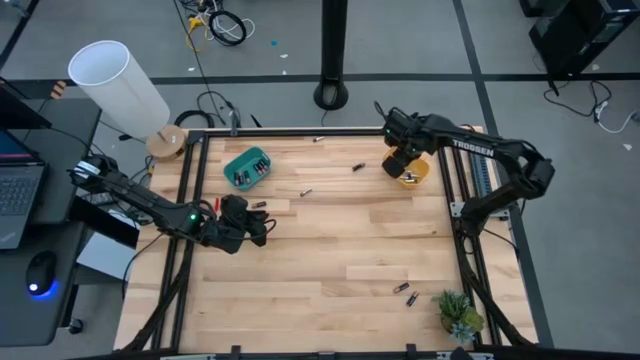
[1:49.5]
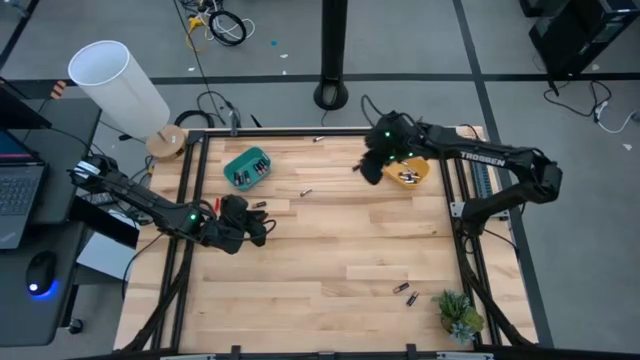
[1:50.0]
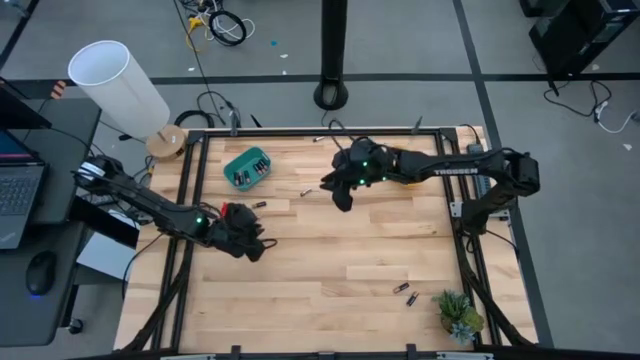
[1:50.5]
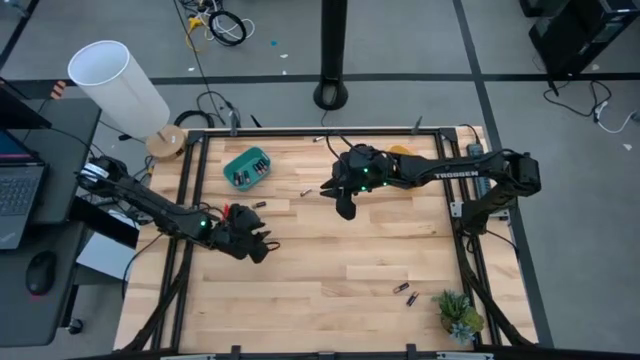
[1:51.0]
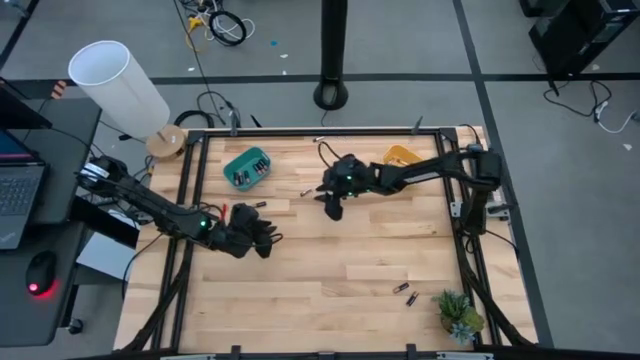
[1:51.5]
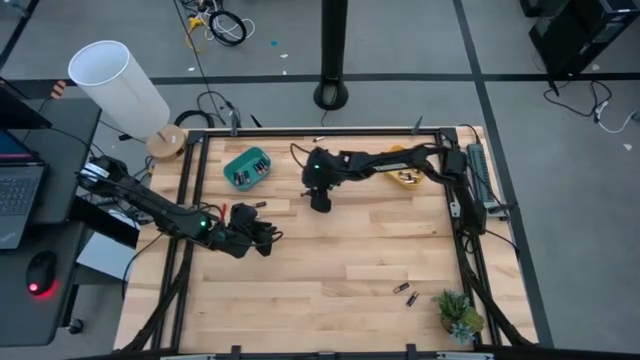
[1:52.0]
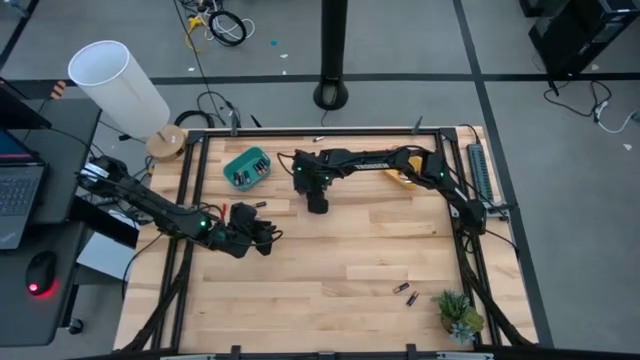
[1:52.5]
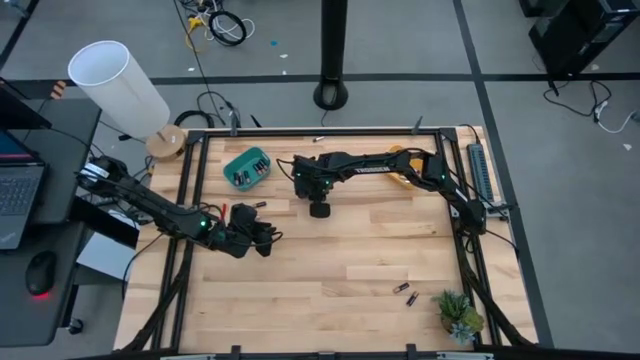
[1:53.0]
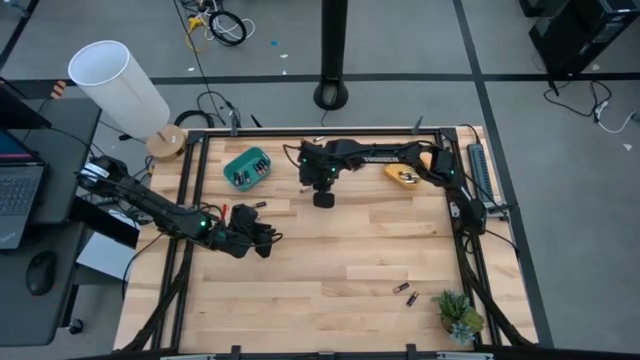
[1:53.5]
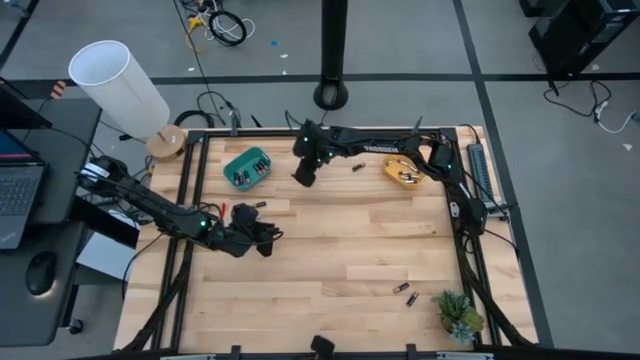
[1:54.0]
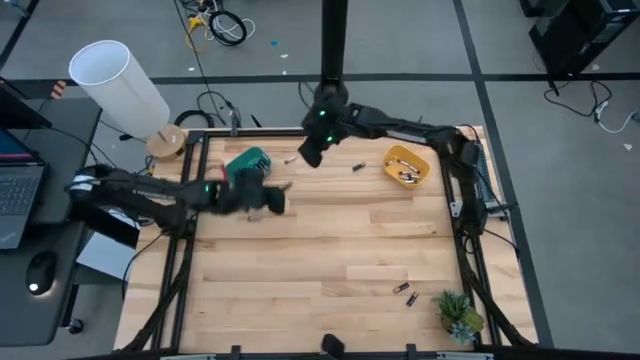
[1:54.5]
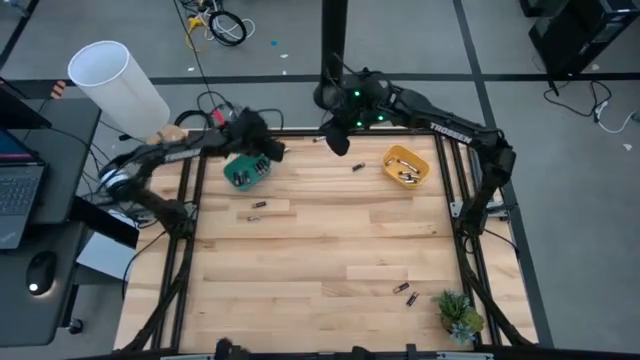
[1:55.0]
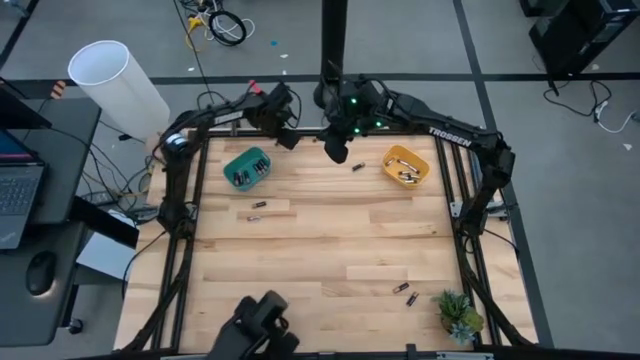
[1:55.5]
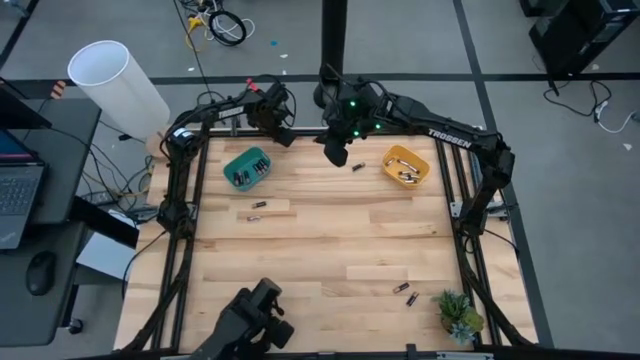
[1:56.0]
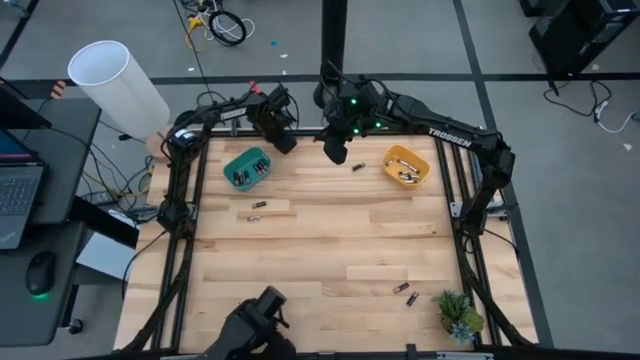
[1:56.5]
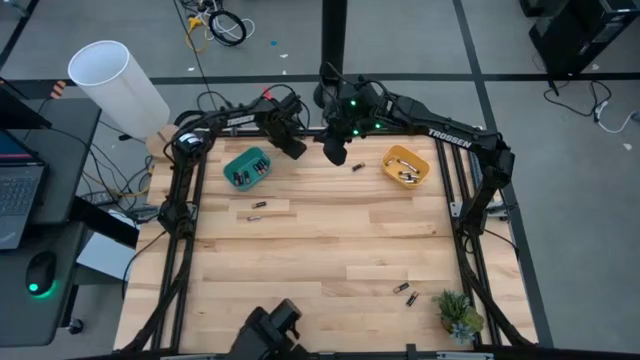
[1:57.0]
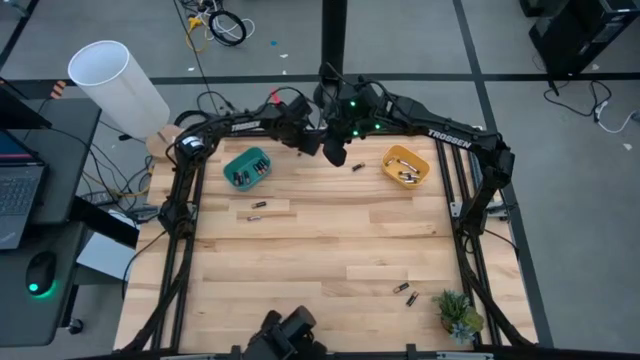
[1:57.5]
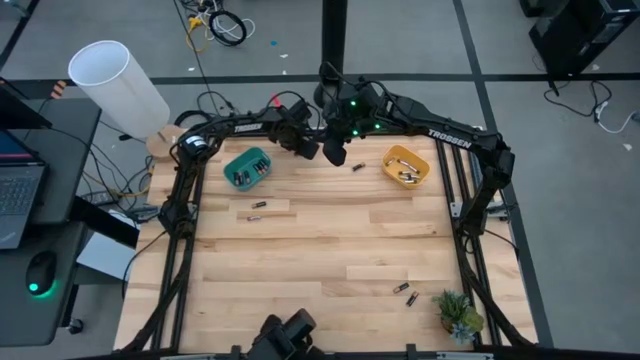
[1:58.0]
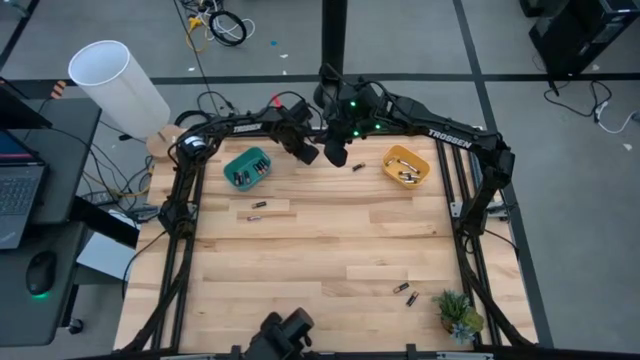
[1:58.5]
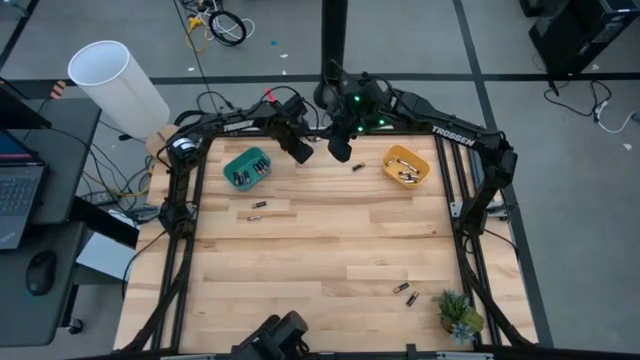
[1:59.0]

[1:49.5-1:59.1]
Task: Sort batteries
Put the silver battery into the yellow bin

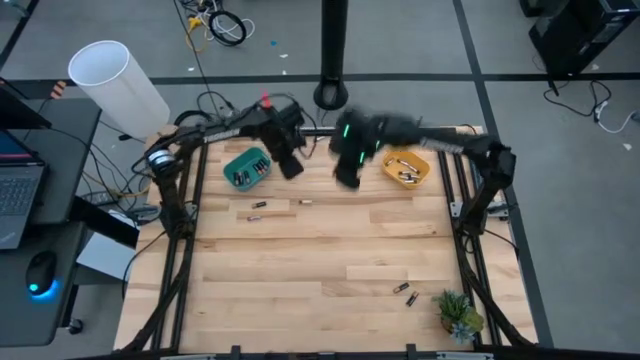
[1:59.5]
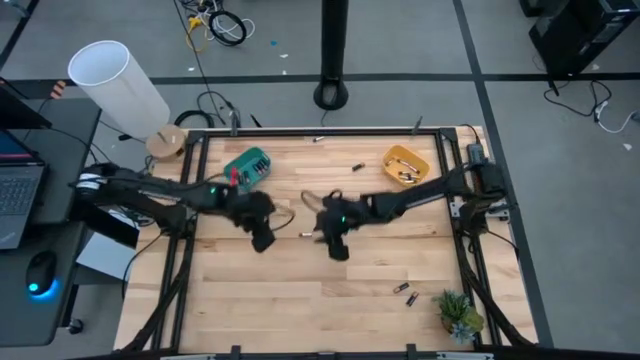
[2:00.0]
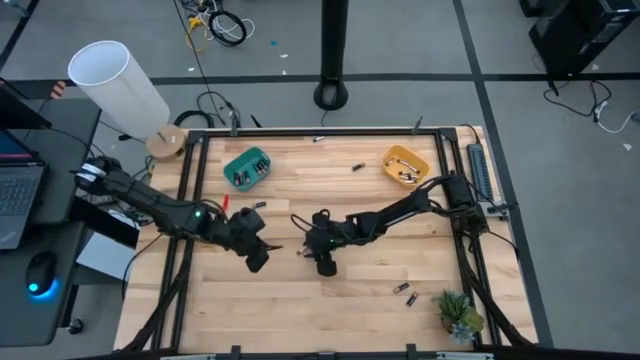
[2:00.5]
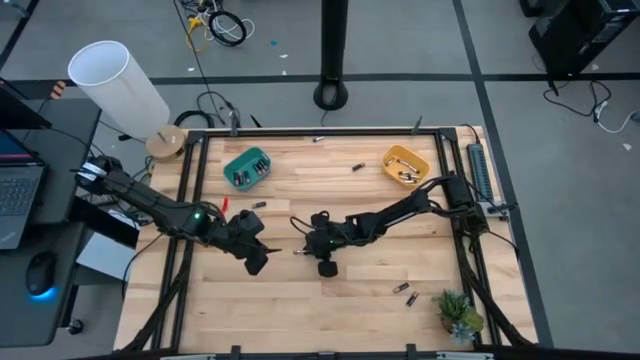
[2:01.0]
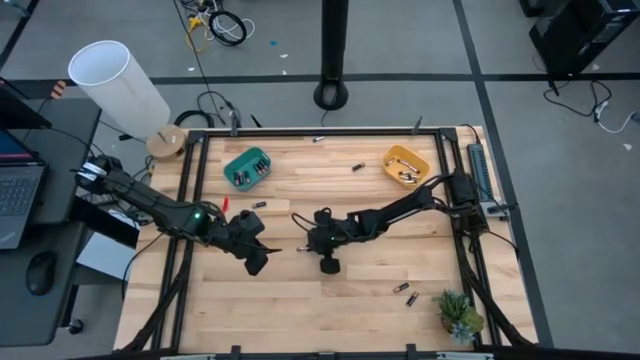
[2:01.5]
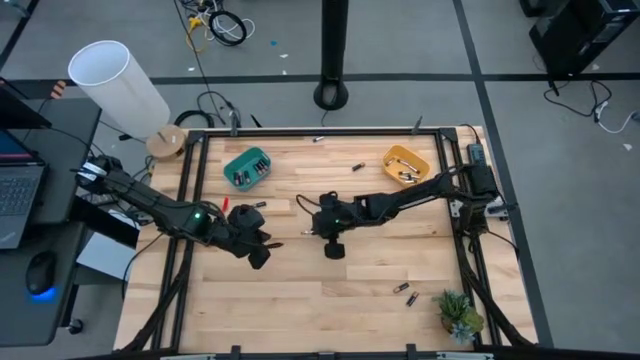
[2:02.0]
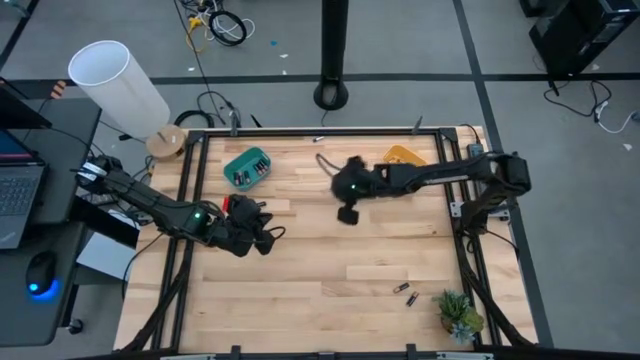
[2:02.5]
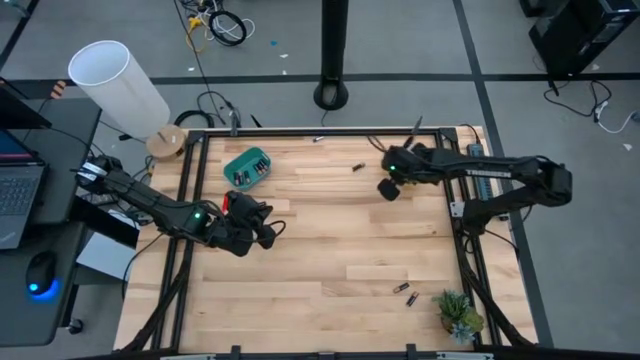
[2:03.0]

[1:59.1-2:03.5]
Put the silver battery into the yellow bin

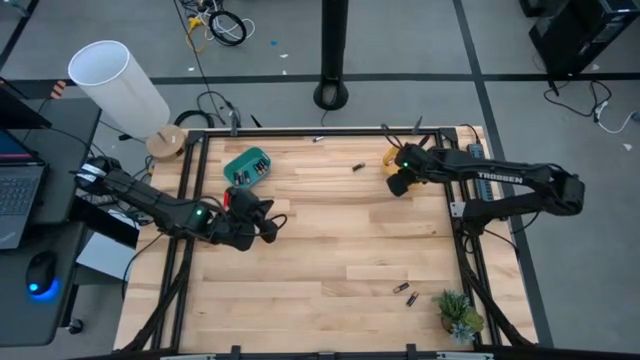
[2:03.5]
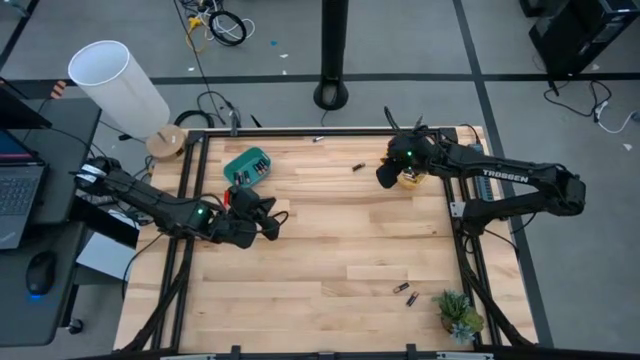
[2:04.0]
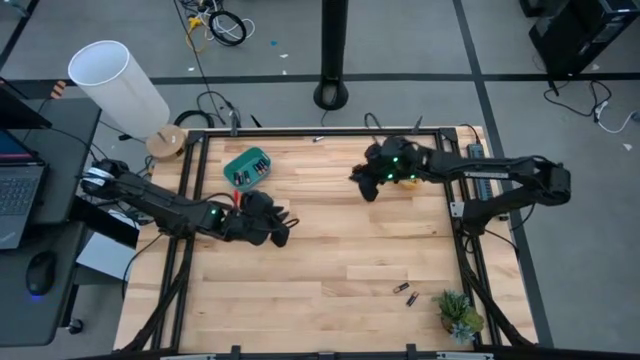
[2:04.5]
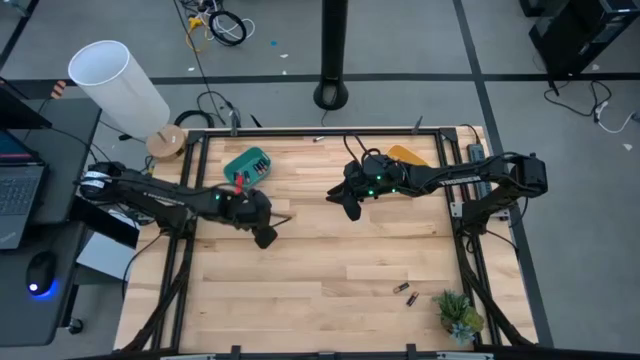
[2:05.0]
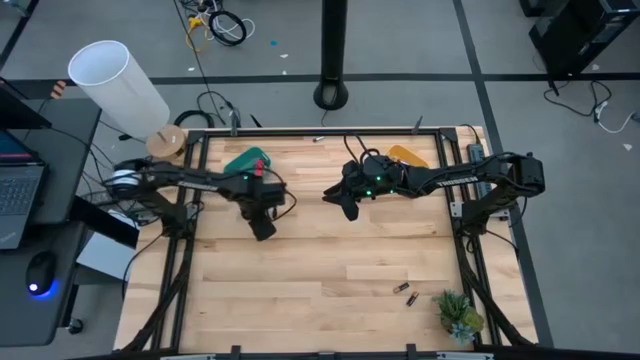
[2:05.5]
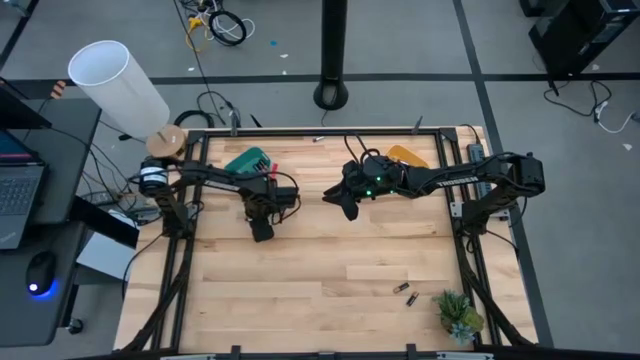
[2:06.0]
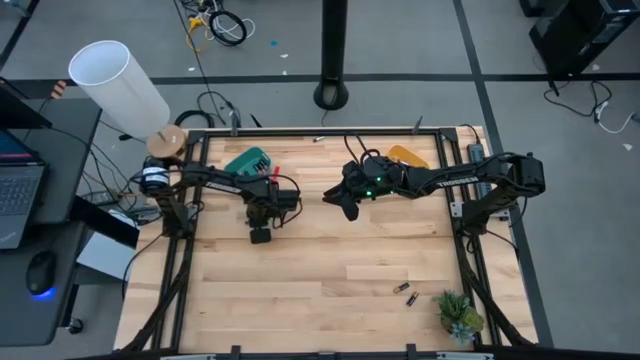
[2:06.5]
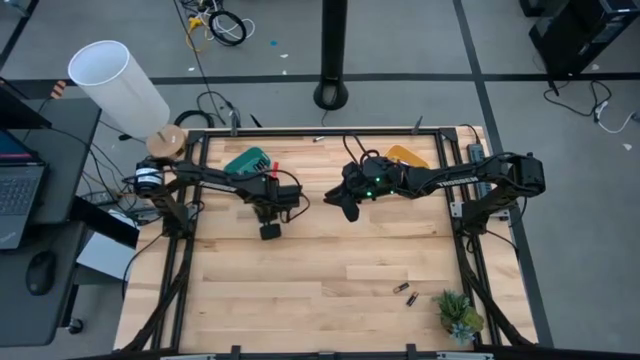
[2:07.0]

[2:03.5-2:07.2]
Put the silver battery into the yellow bin

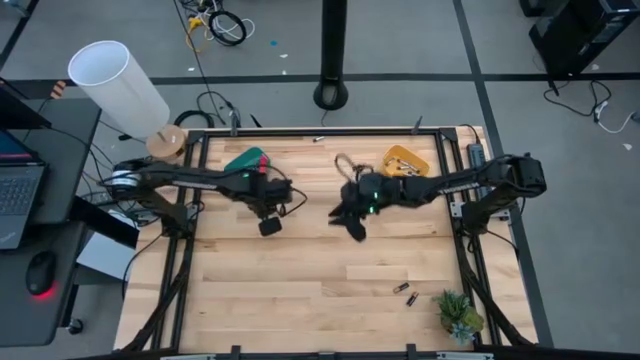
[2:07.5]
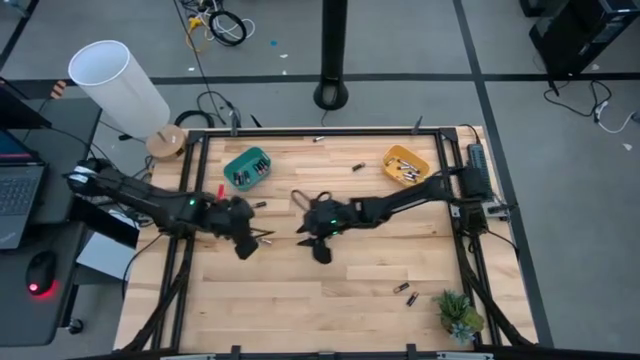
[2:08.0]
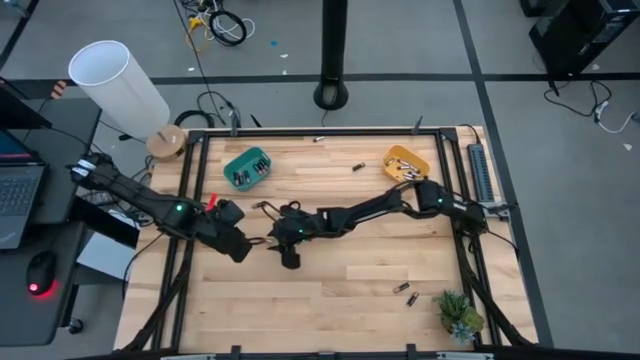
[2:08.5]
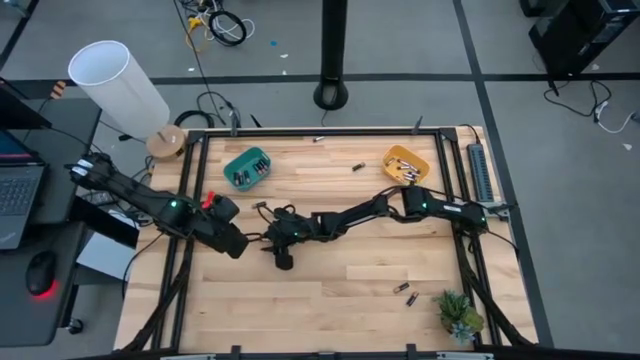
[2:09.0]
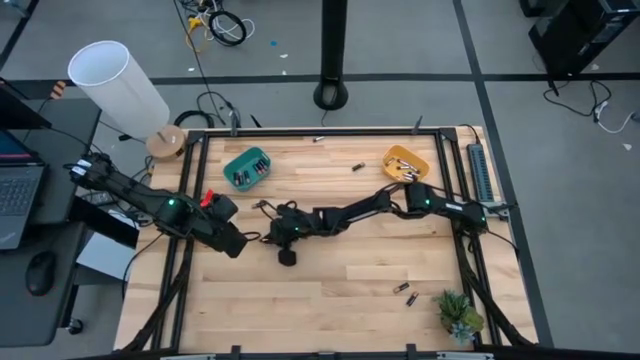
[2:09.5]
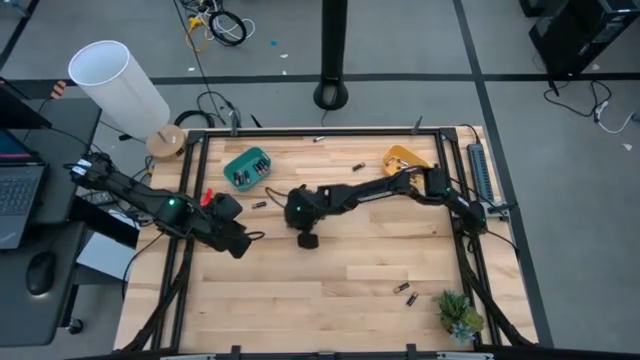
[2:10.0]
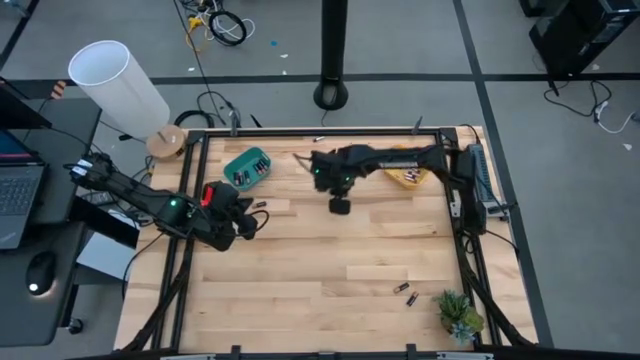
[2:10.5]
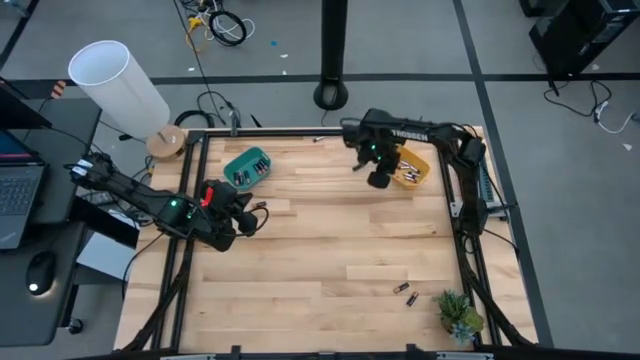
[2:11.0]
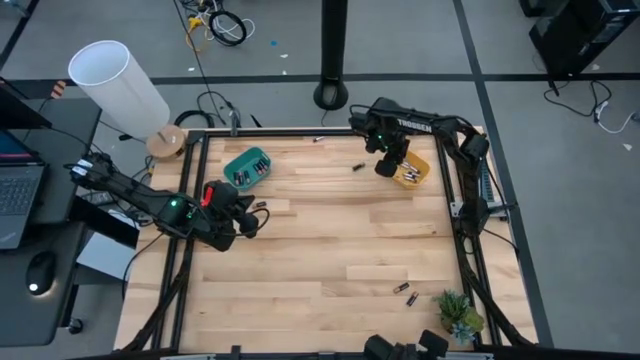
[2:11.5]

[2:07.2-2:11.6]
Put the silver battery into the yellow bin
